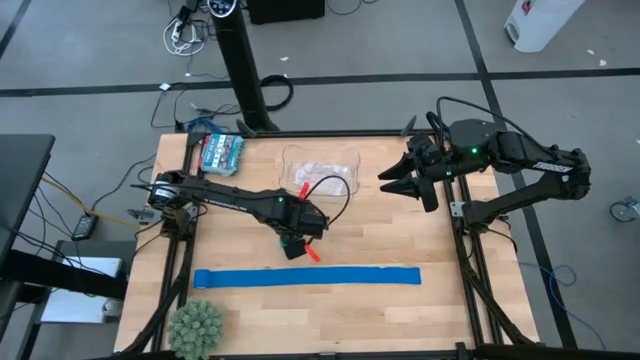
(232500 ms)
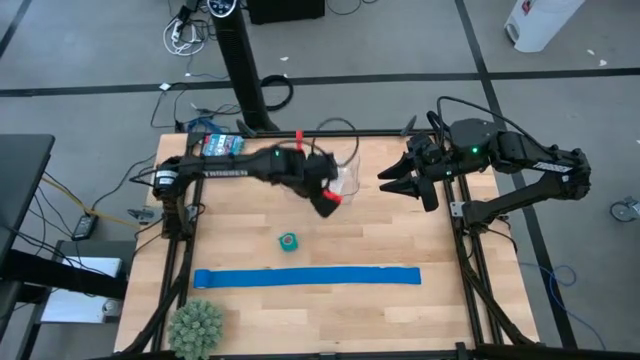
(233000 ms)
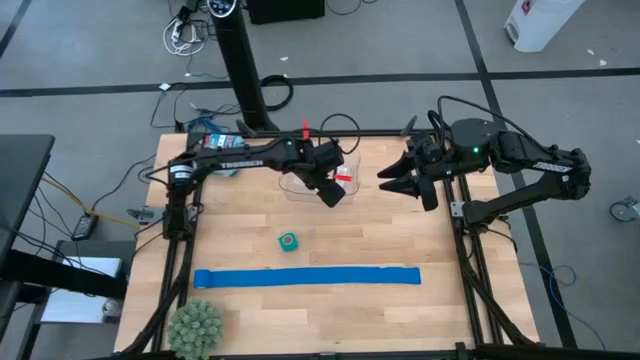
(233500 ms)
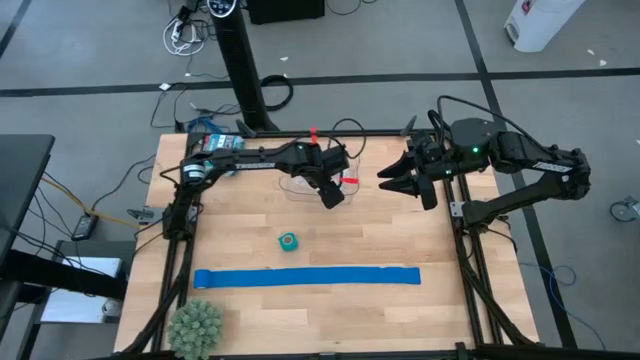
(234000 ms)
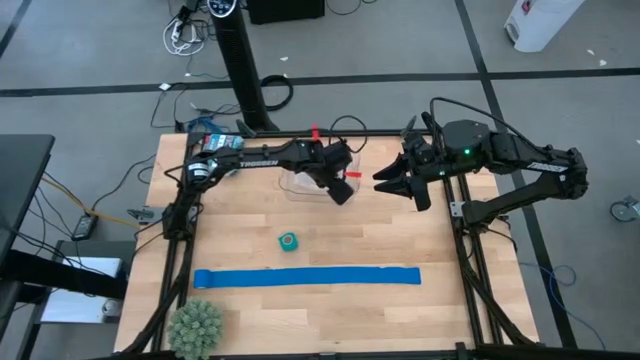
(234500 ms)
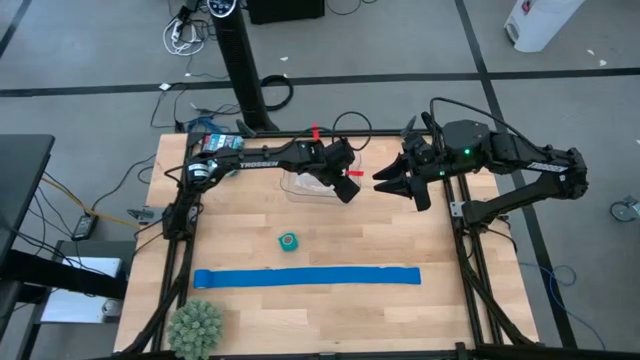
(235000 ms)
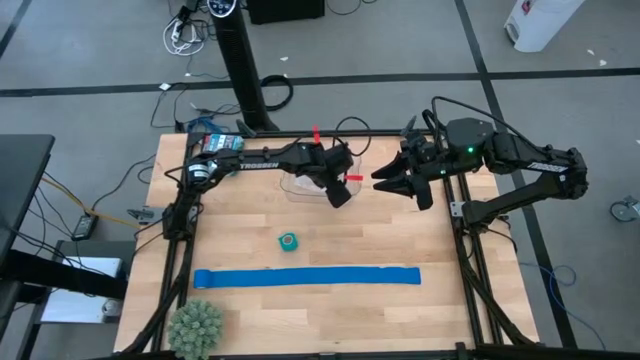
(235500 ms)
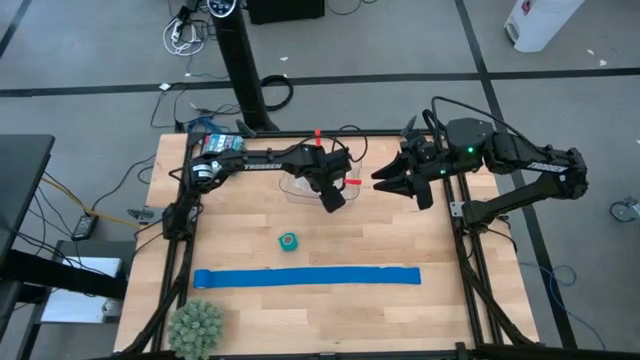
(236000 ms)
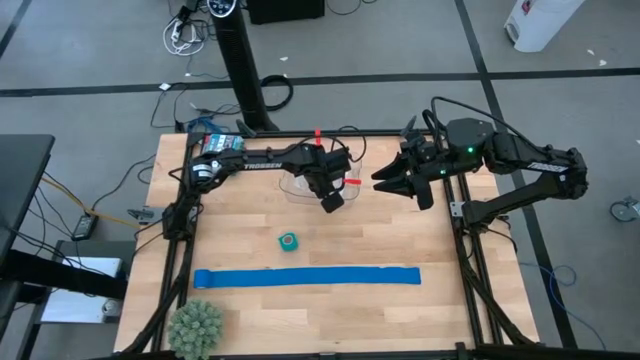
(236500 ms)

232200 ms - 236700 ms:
Task: Roll bandage
Put the green bandage into the transparent zip bag

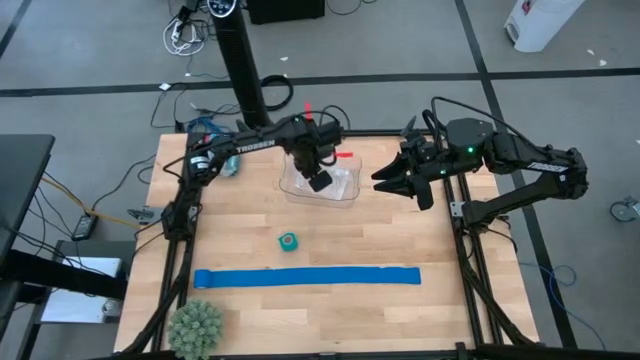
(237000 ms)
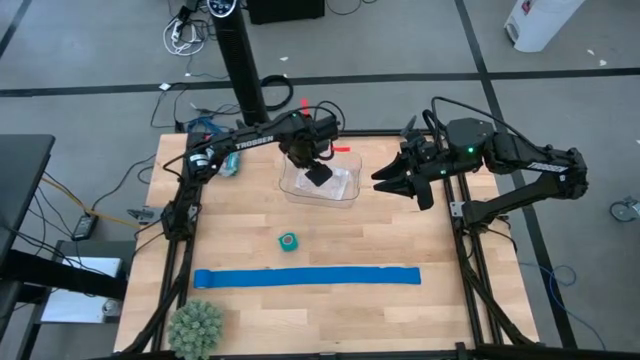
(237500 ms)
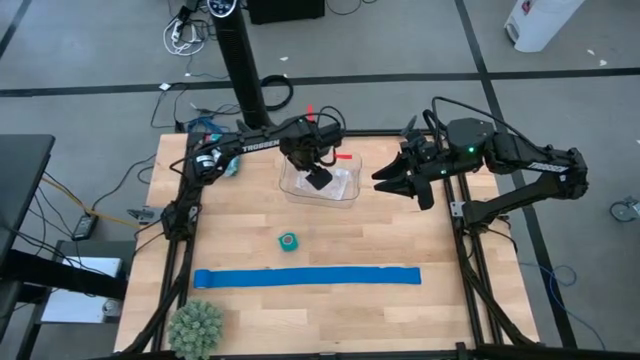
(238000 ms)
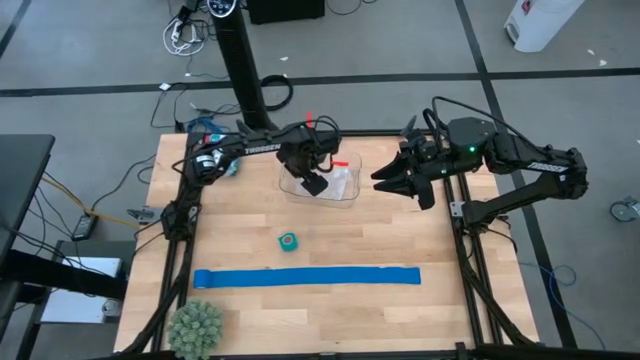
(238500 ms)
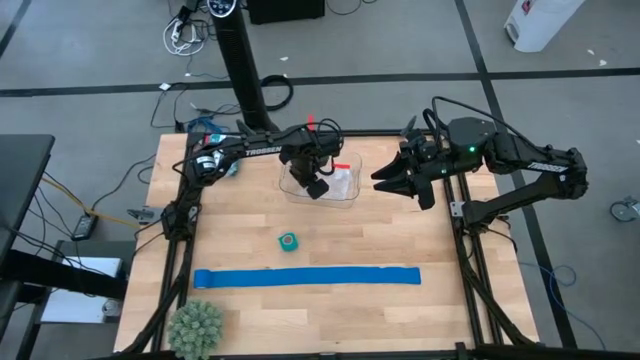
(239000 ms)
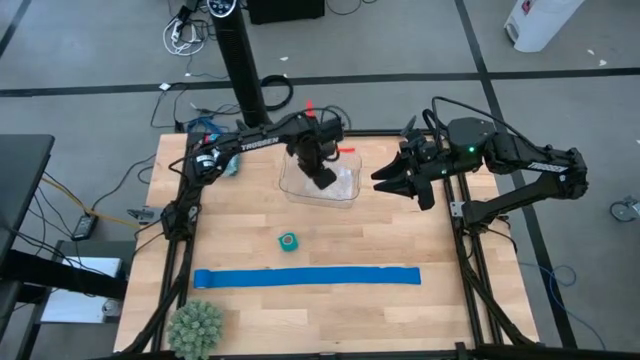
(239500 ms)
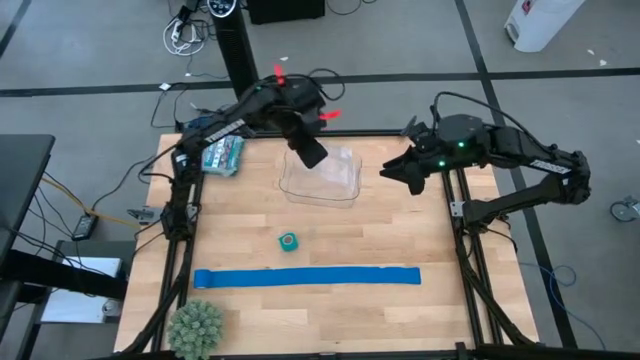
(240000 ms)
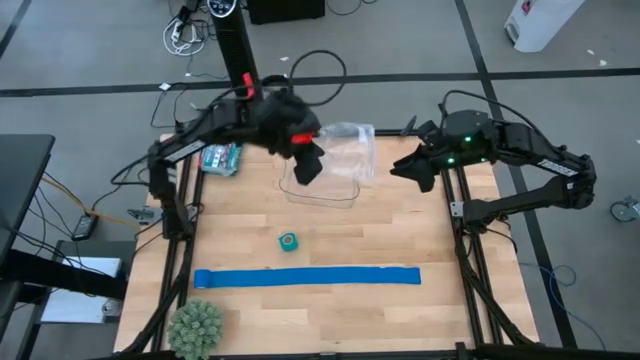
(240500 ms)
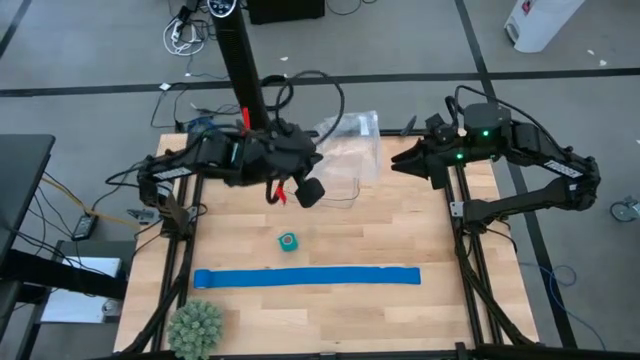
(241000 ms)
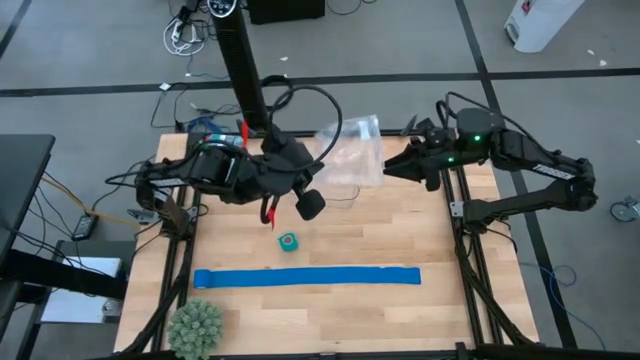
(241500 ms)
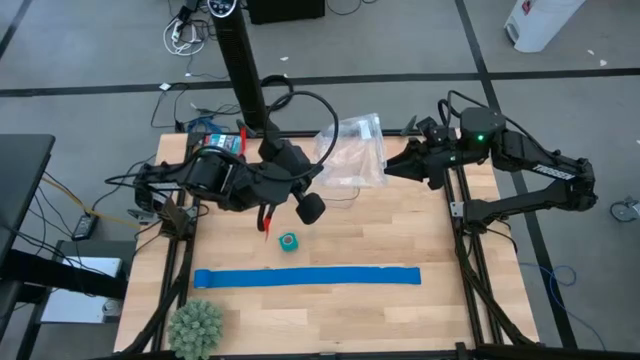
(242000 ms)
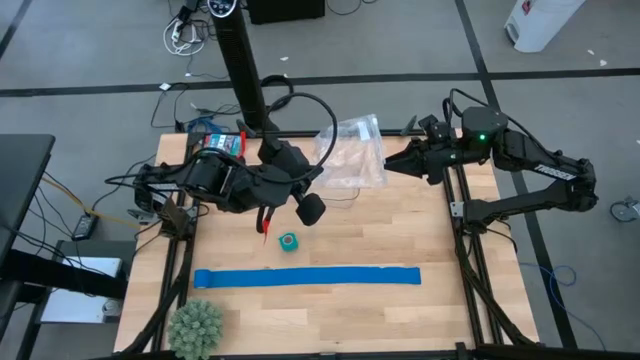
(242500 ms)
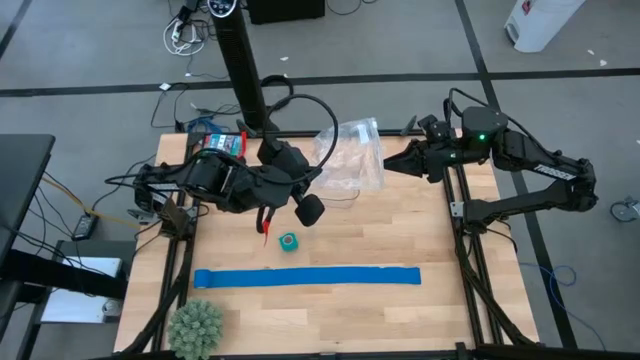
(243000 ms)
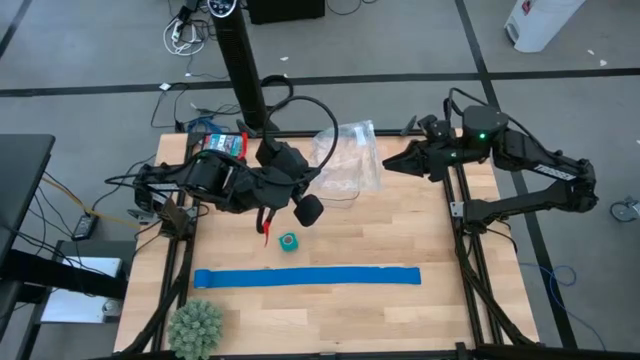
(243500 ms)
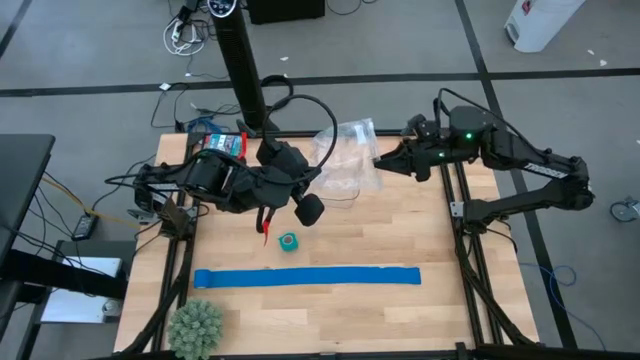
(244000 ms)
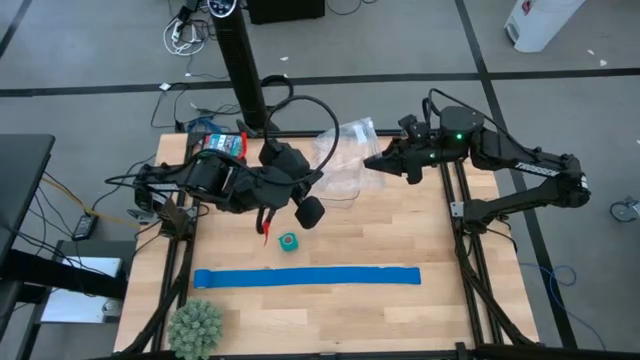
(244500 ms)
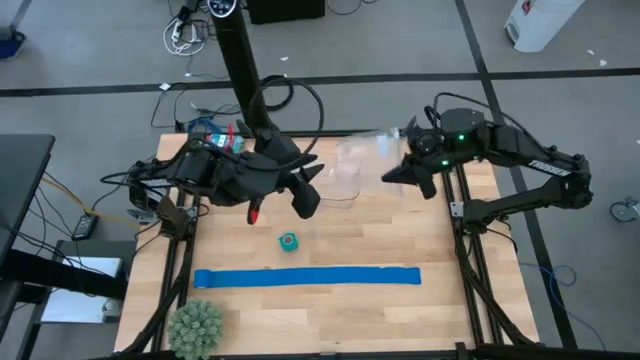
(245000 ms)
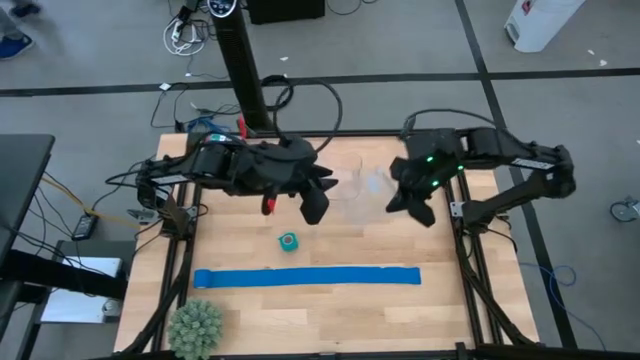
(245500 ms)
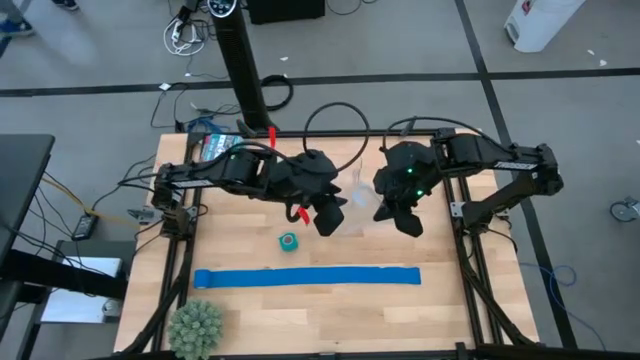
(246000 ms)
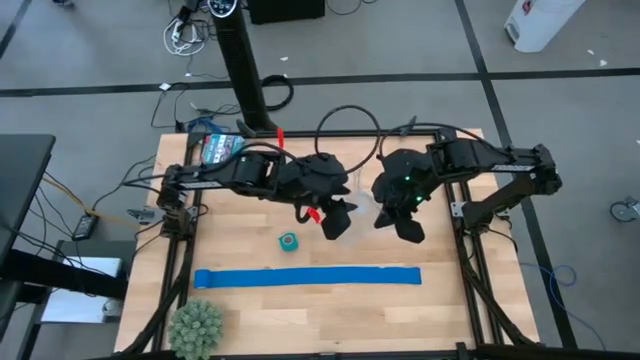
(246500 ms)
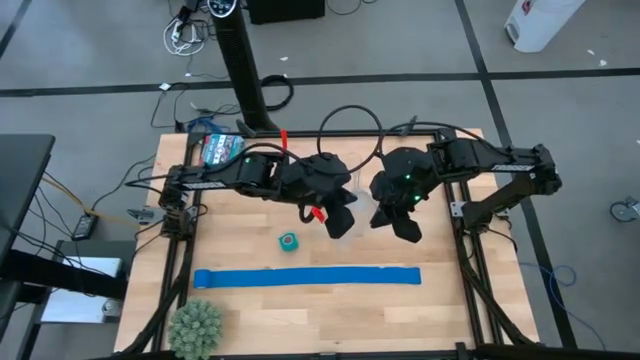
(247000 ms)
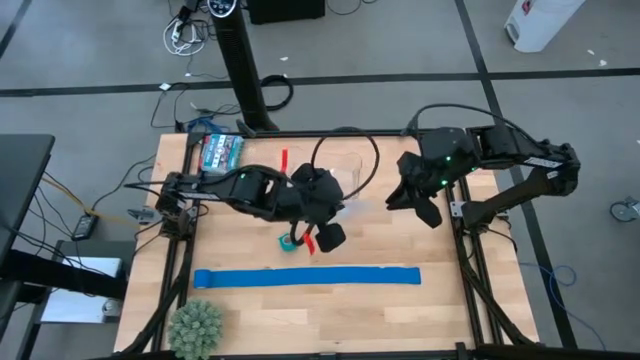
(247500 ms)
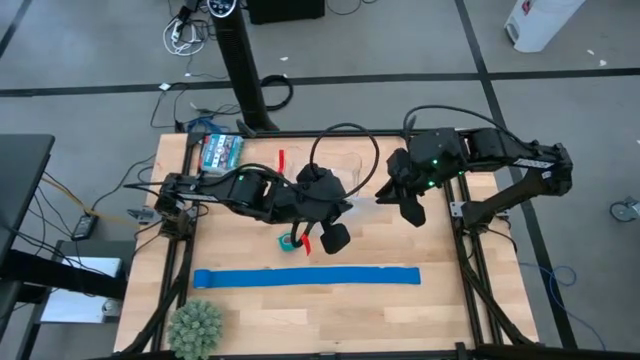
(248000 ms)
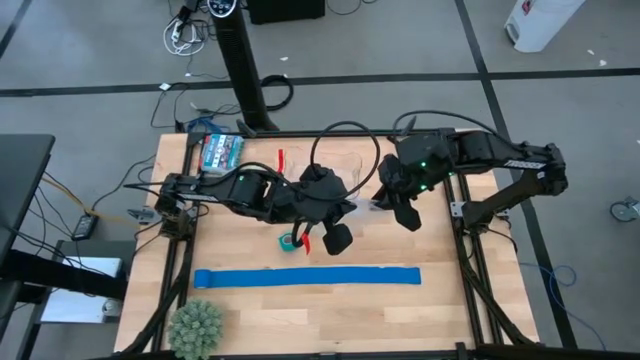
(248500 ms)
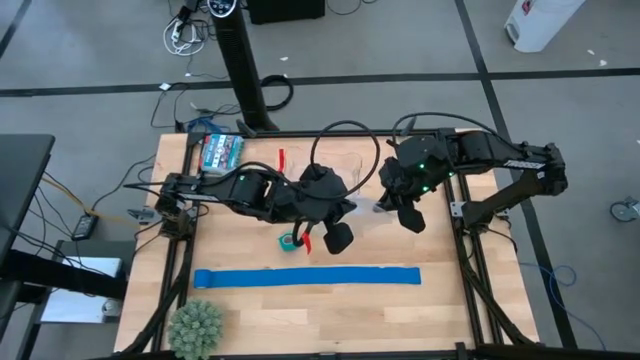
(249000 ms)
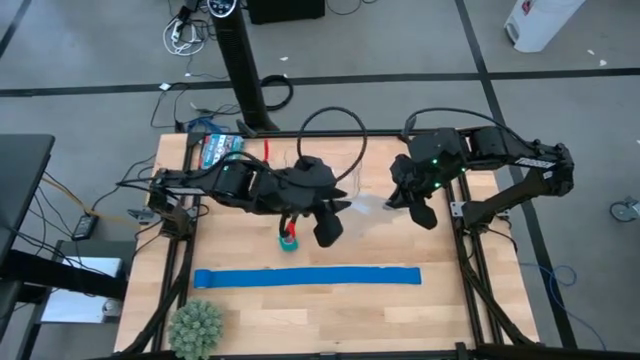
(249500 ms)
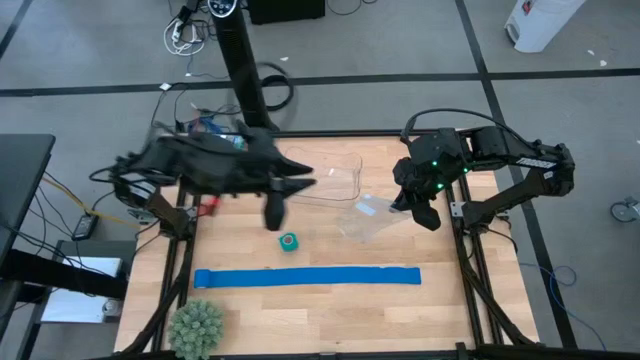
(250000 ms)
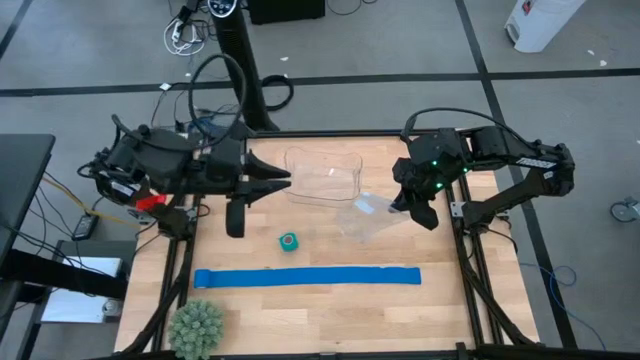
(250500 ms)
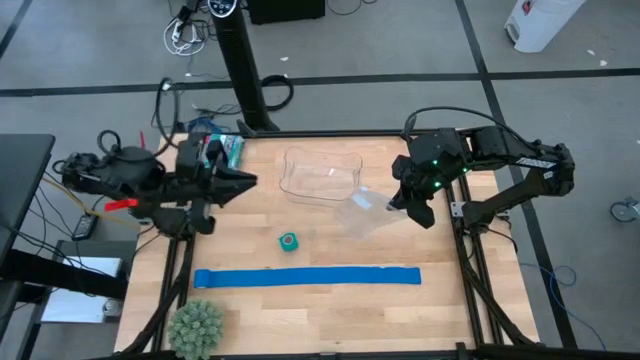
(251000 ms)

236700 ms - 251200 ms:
Put the green bandage into the transparent zip bag

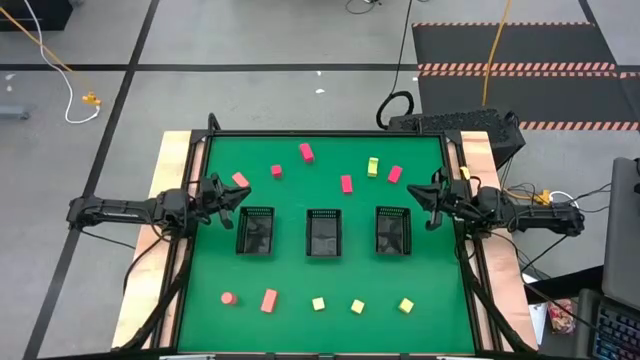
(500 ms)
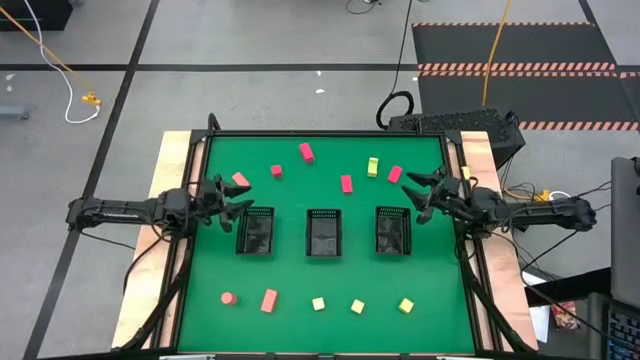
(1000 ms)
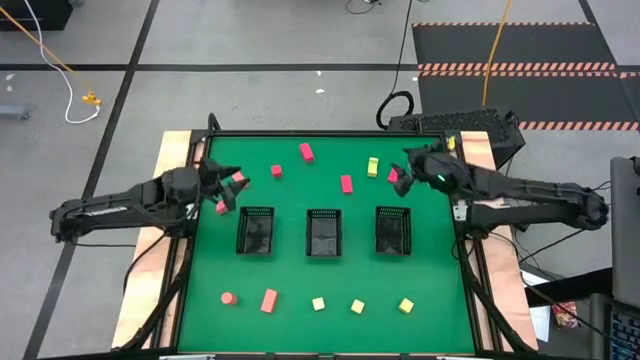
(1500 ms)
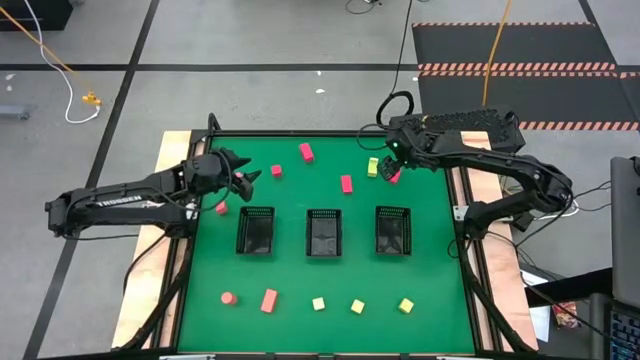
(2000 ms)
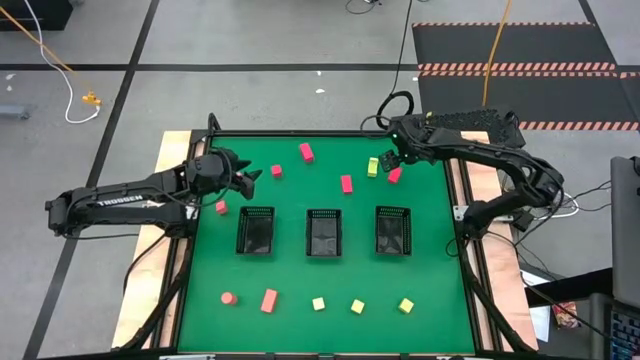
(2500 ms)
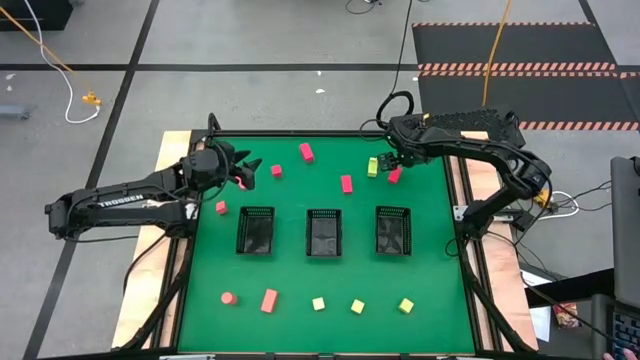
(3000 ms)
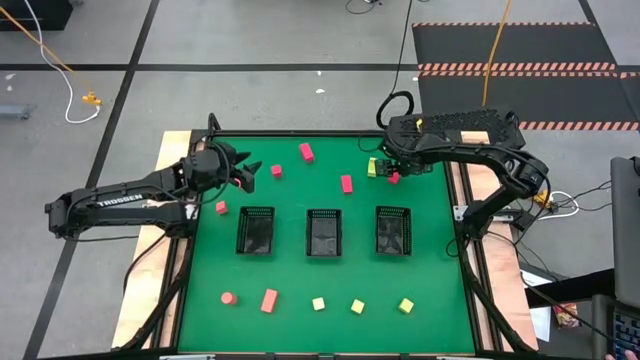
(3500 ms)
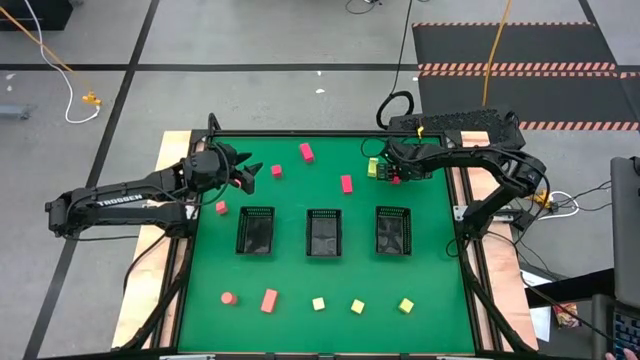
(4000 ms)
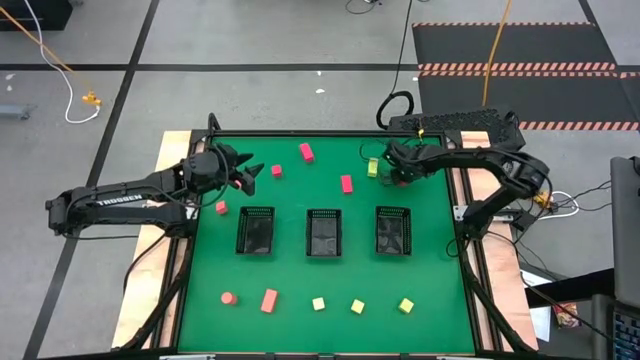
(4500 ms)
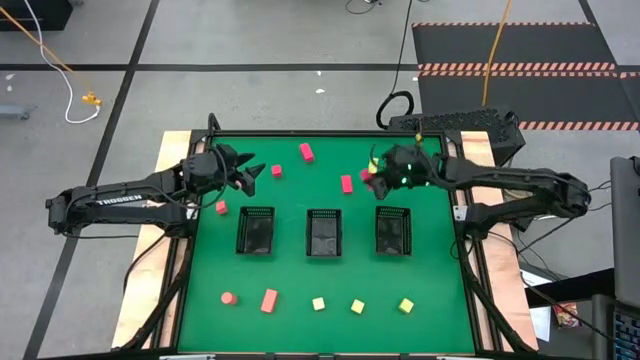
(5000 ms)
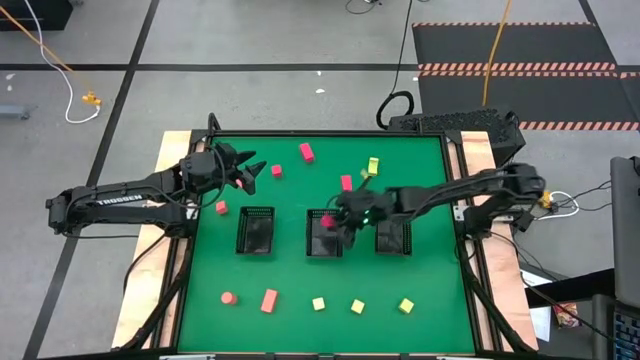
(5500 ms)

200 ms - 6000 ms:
Task: Sort & place blocks by color
Put the red block into the middle black basket
